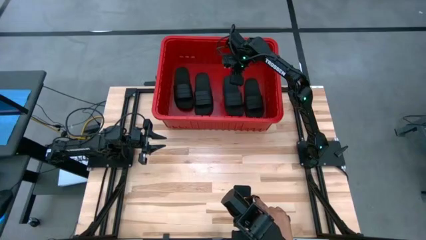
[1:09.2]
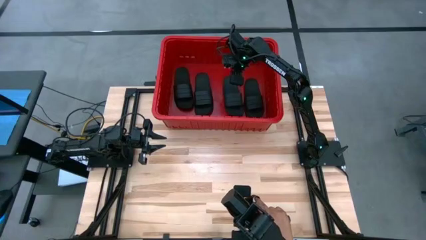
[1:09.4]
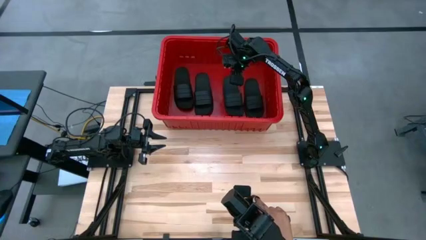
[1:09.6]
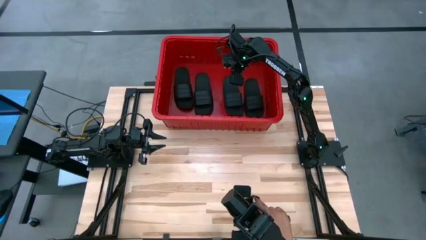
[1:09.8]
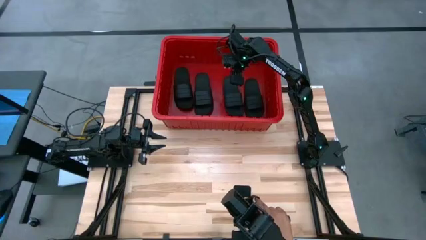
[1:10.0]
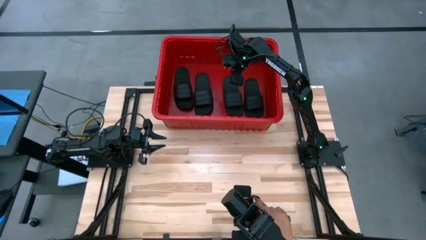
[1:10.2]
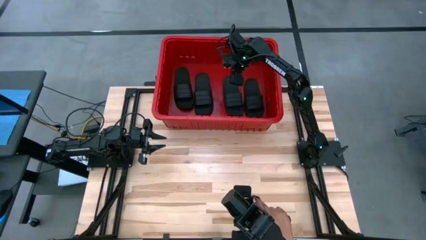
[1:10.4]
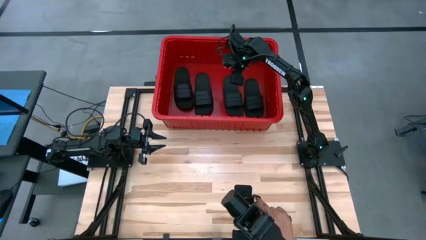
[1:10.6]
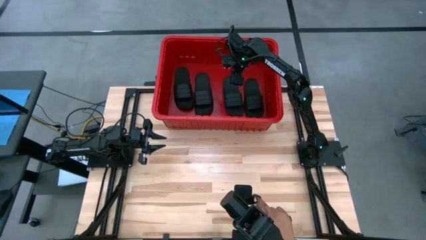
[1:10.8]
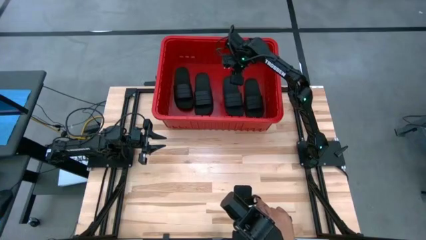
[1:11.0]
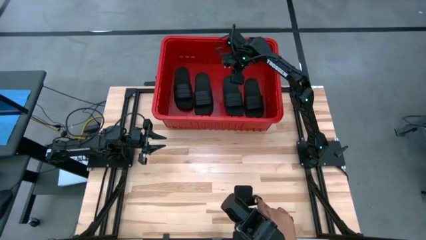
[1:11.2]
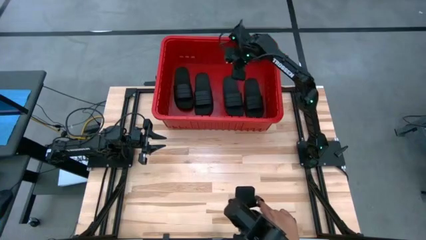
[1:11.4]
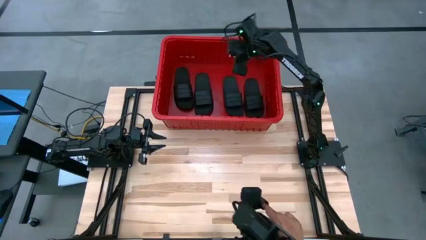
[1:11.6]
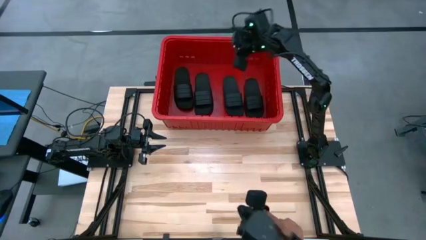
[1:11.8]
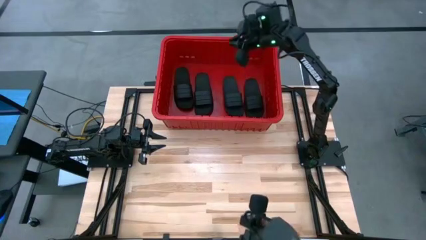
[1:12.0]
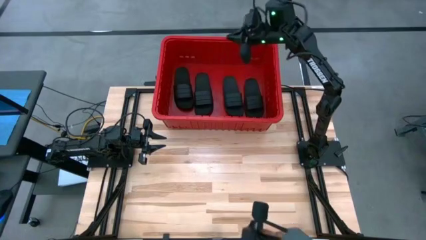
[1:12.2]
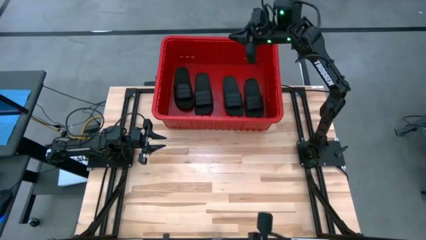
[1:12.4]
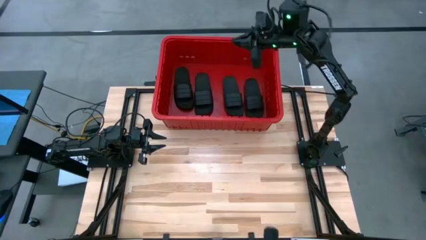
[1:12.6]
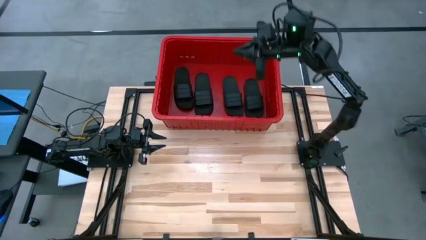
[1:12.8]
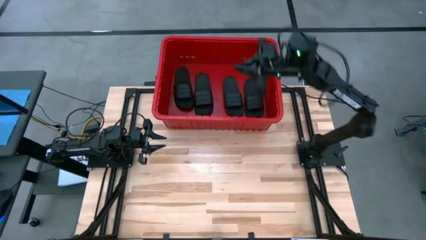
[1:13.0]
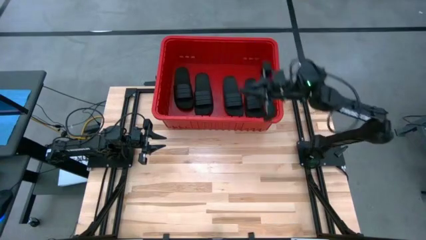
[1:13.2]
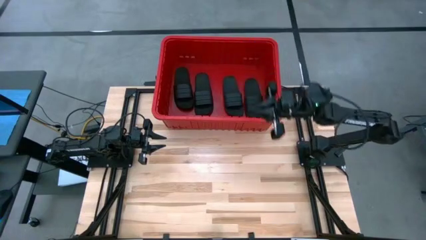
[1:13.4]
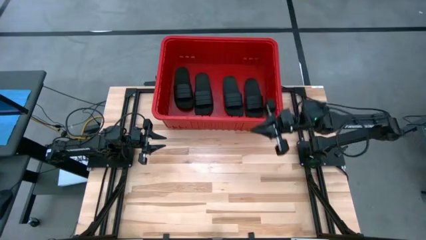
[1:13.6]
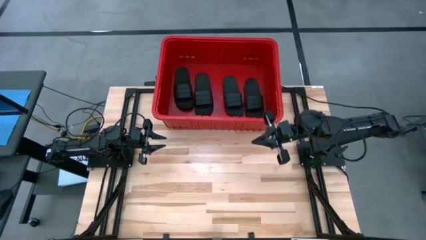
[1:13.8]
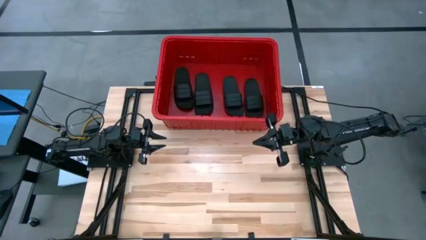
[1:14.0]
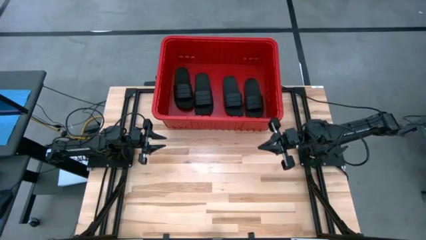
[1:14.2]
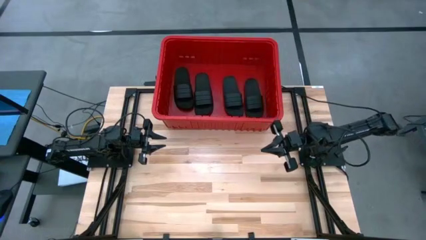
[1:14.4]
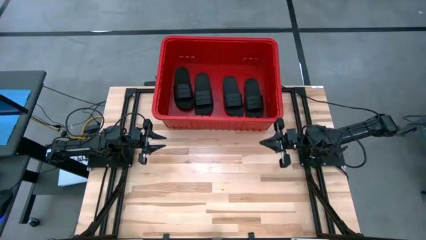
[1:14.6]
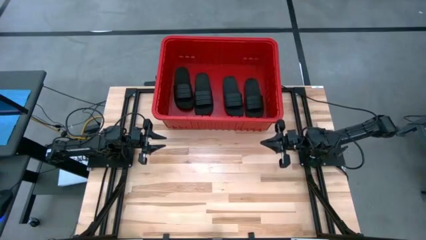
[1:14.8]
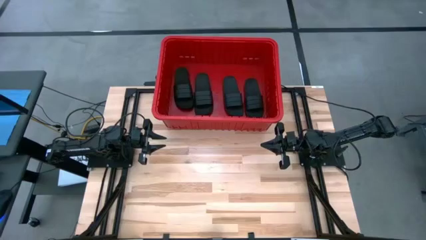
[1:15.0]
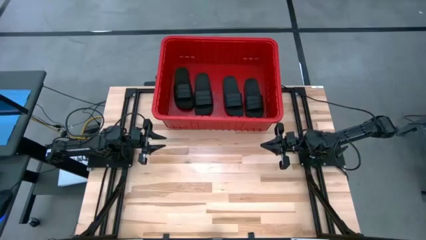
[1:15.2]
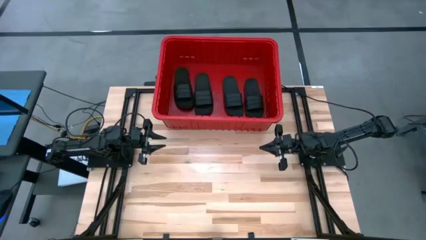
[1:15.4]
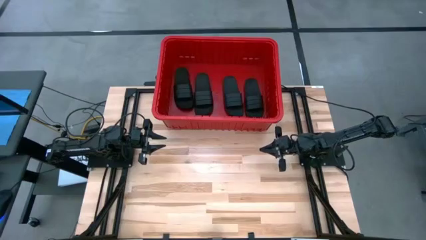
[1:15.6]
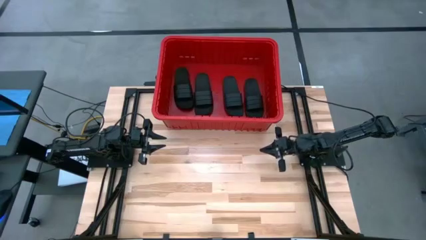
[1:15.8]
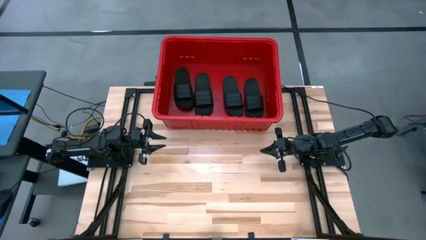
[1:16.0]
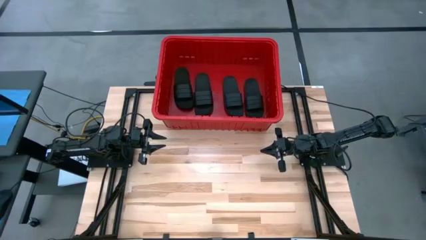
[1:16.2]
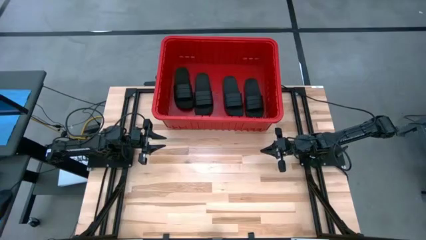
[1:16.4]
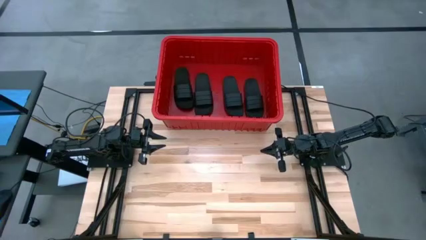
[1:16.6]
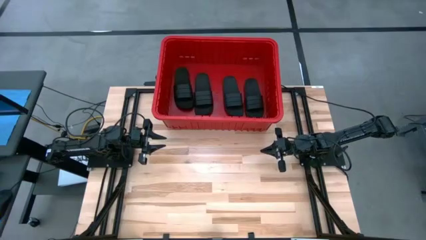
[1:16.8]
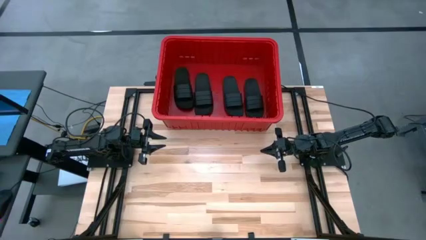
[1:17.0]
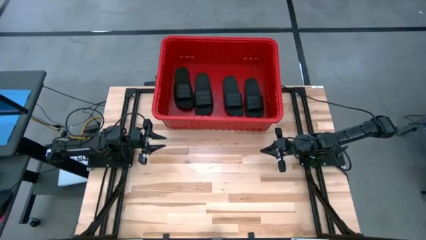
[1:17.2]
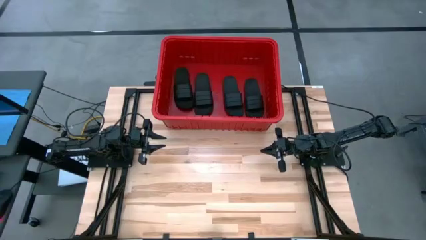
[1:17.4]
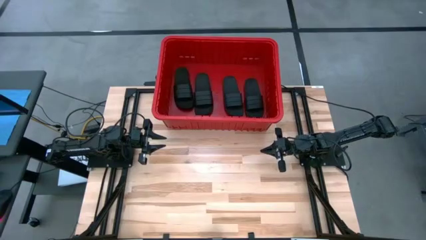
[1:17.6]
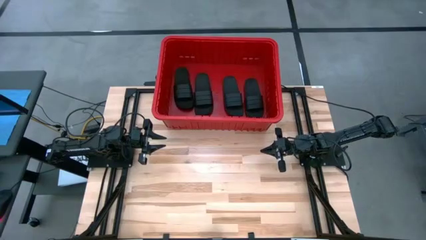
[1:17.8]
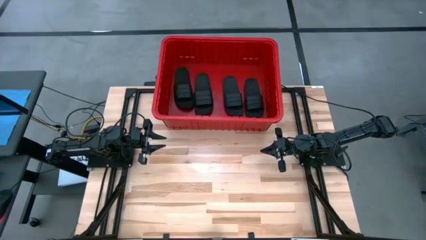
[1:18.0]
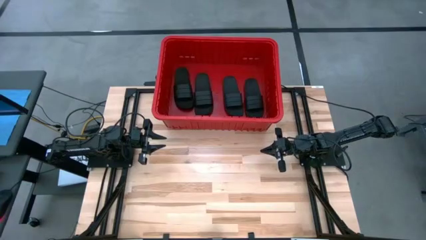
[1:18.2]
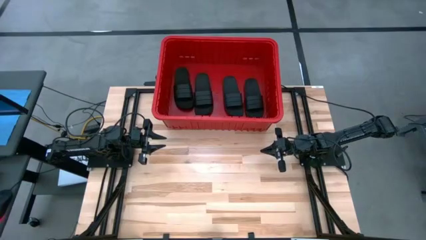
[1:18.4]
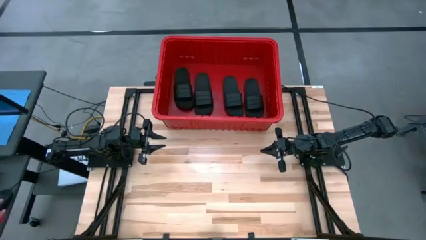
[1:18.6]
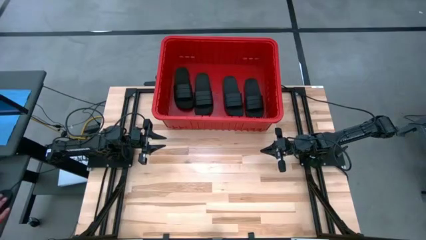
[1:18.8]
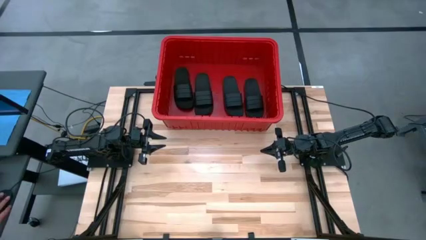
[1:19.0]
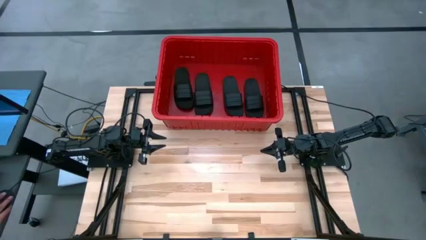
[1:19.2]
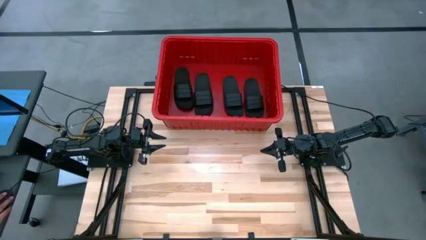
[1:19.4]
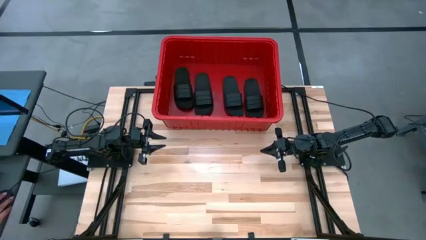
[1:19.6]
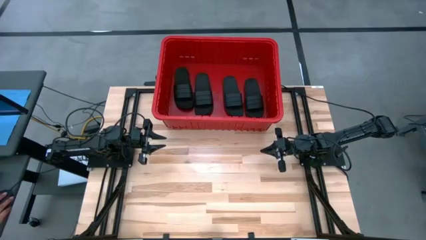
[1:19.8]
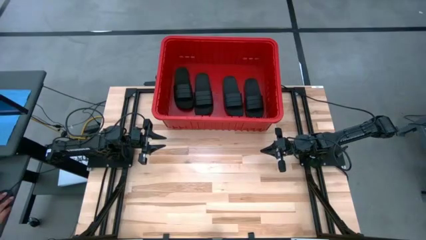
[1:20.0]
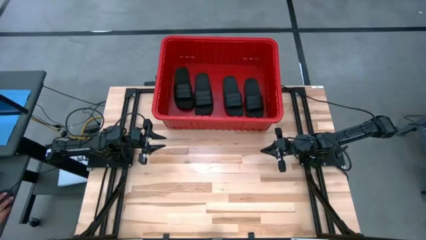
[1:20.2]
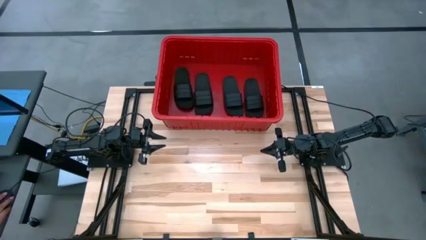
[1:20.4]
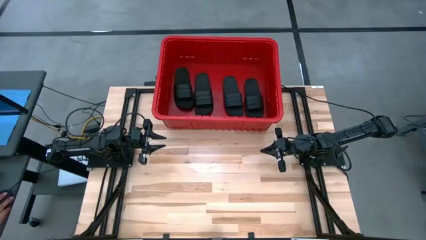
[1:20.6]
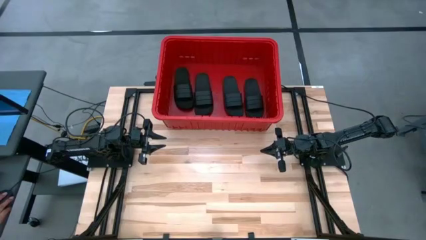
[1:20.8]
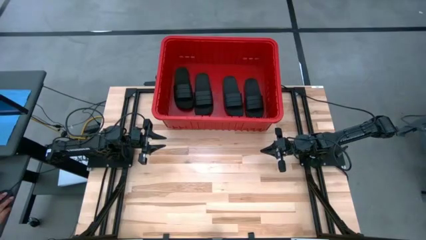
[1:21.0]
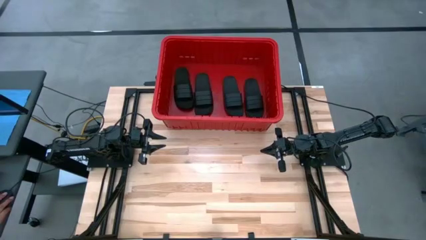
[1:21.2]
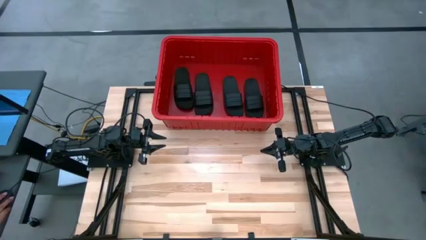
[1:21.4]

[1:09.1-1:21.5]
Task: Pick and place slides into bin
Return to Home Position

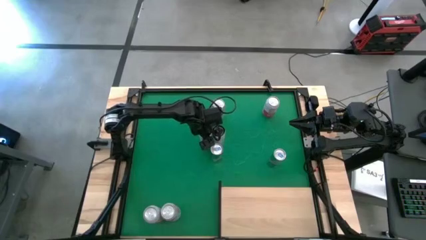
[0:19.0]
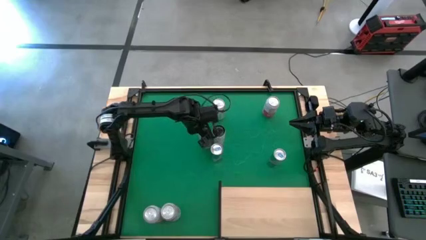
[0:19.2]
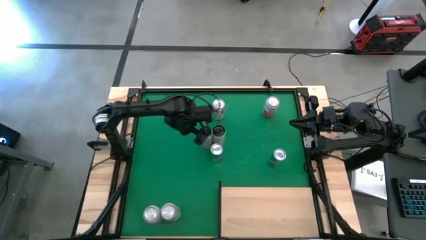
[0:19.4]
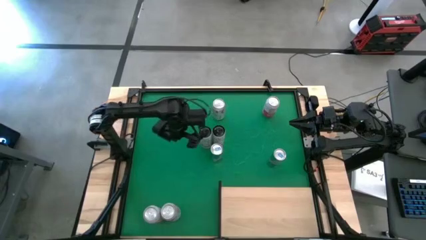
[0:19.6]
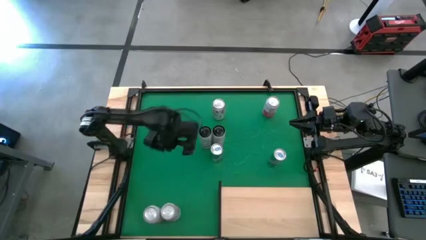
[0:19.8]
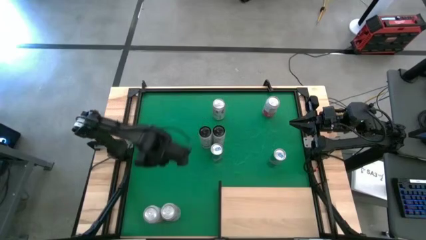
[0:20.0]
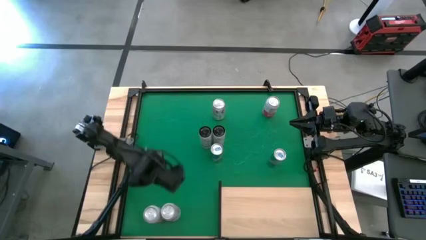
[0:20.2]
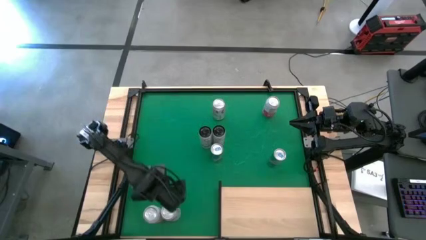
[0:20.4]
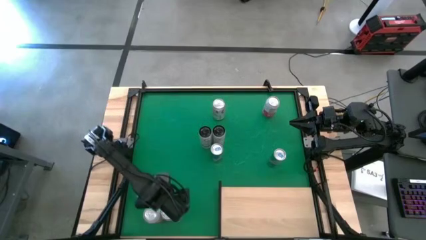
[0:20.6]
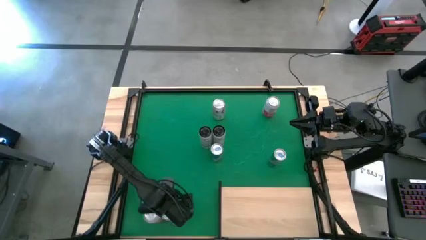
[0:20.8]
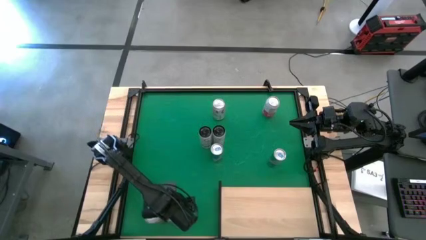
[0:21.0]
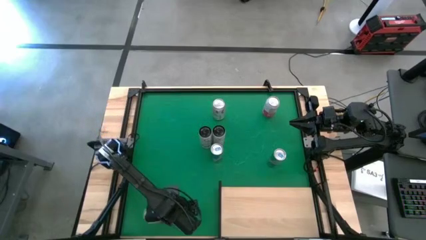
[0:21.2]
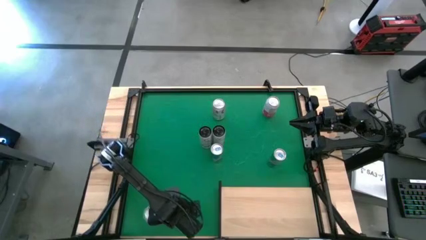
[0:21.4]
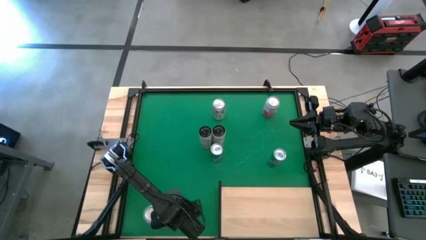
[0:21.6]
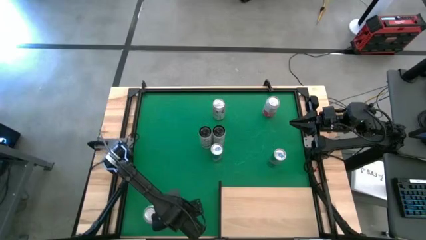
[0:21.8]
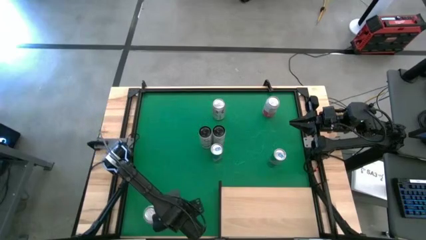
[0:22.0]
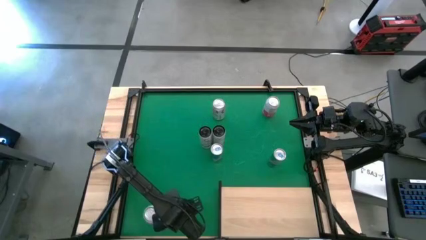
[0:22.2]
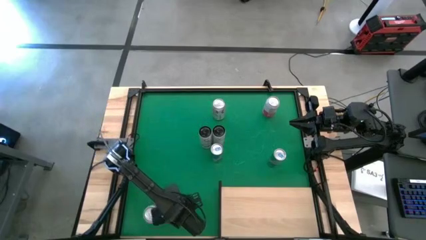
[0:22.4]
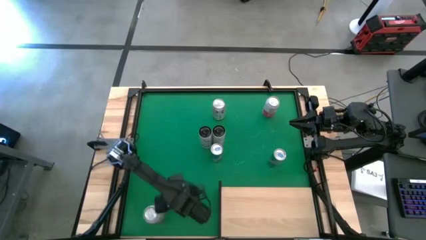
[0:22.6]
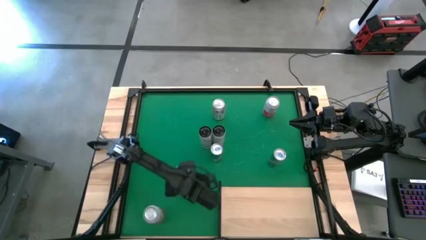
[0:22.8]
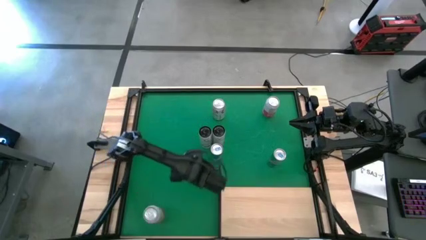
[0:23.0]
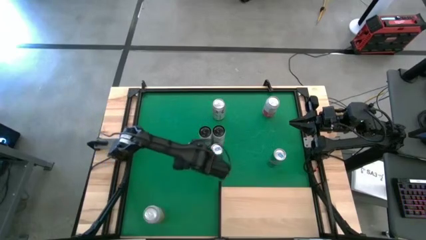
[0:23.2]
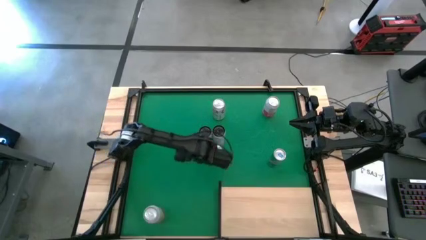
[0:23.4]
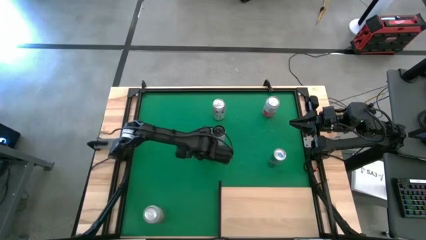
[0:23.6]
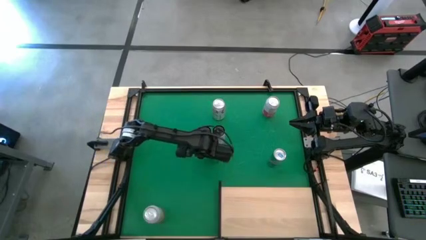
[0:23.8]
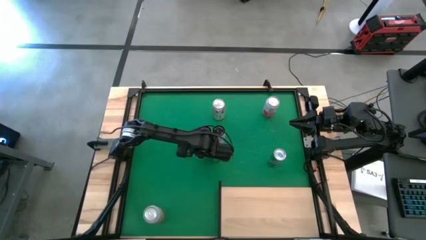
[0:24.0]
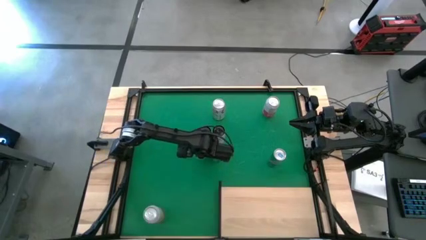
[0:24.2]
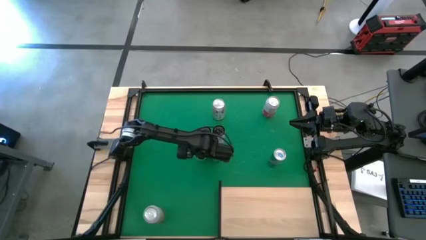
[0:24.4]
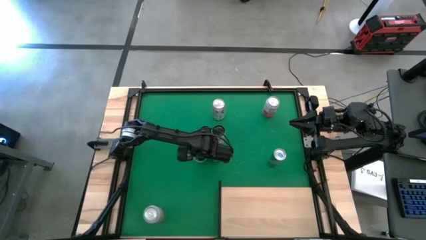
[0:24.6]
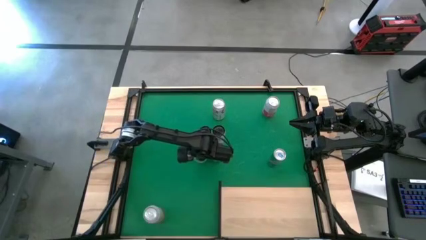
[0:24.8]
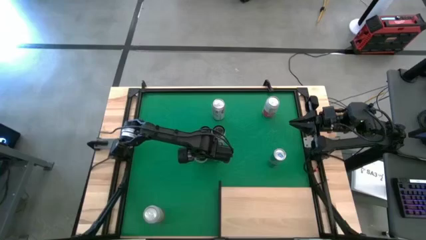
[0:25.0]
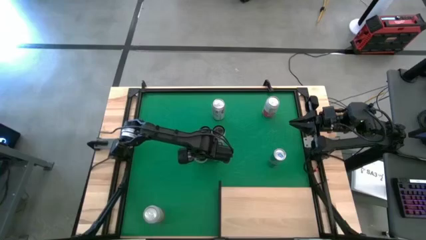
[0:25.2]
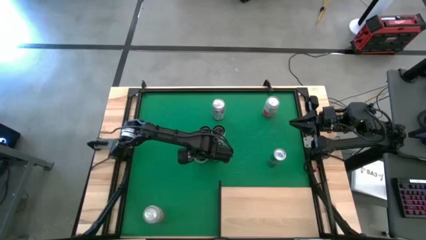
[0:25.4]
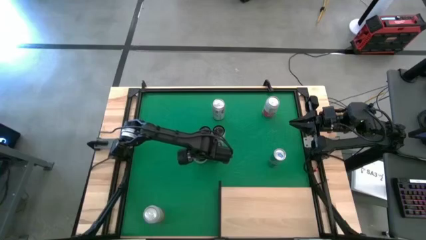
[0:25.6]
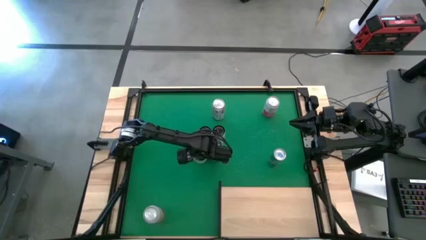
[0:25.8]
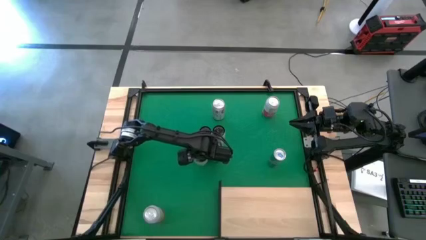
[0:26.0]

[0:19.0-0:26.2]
Task: Place canned beverage on shelf
Move the bottom red silver soda can to the middle of the table
